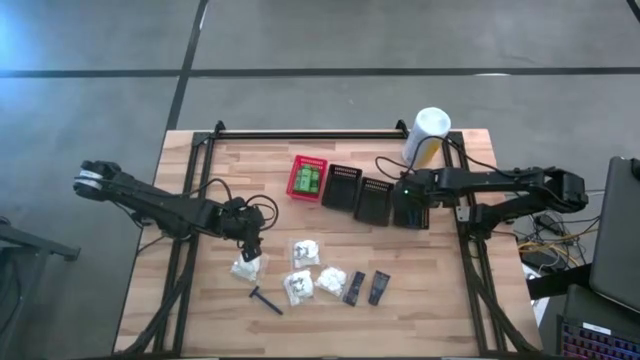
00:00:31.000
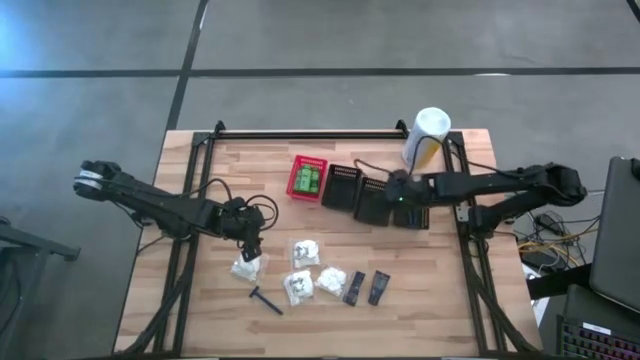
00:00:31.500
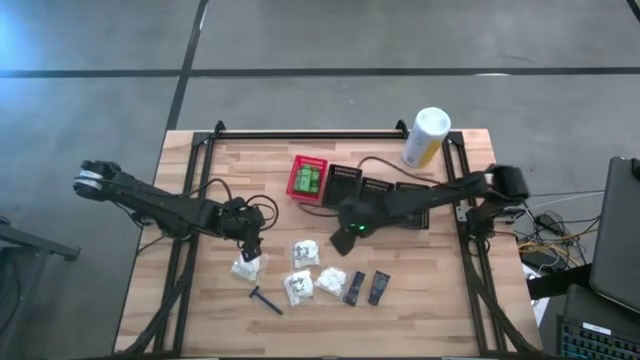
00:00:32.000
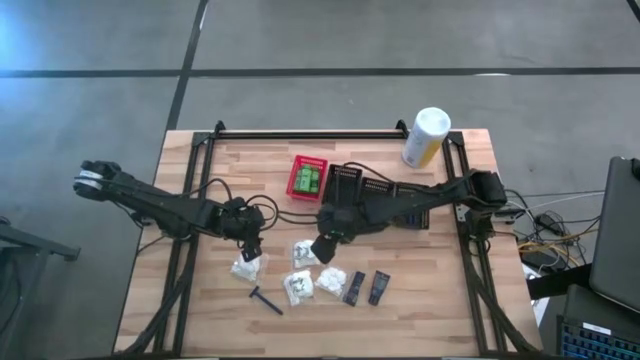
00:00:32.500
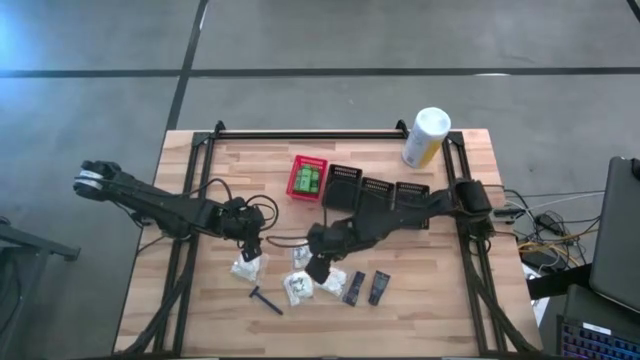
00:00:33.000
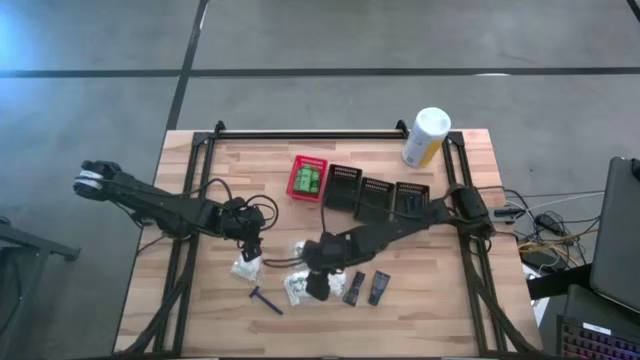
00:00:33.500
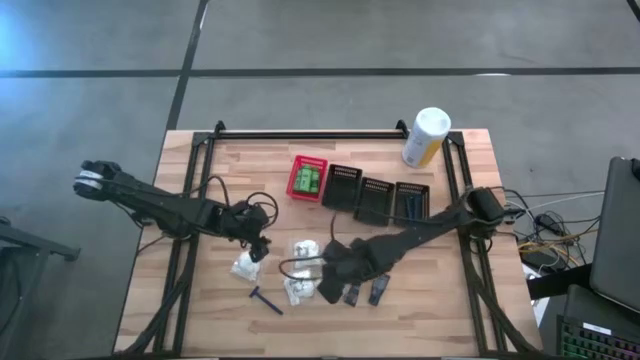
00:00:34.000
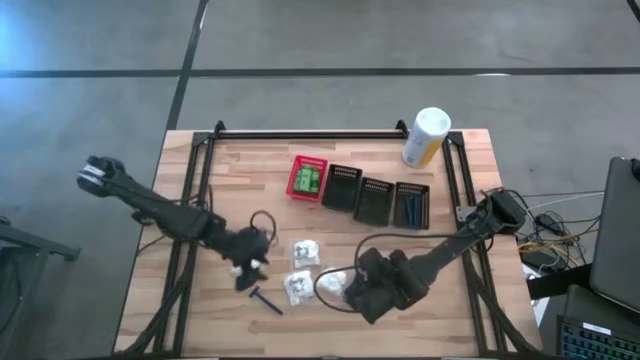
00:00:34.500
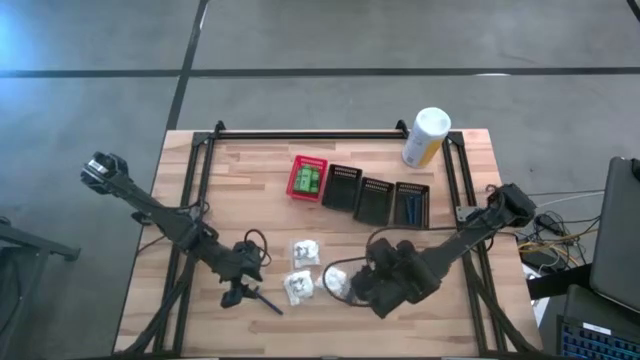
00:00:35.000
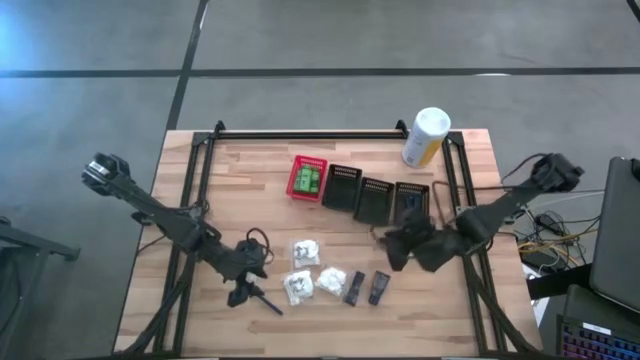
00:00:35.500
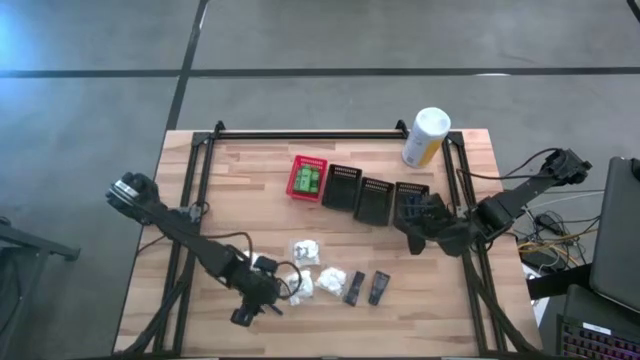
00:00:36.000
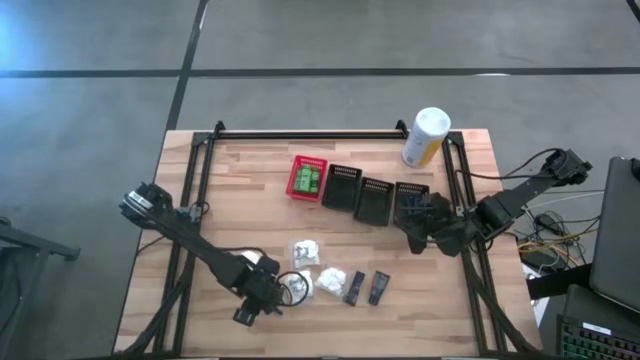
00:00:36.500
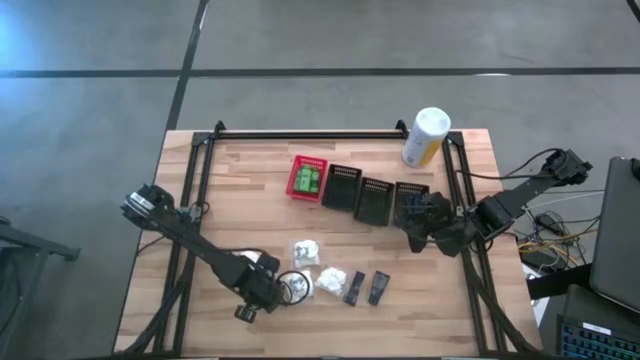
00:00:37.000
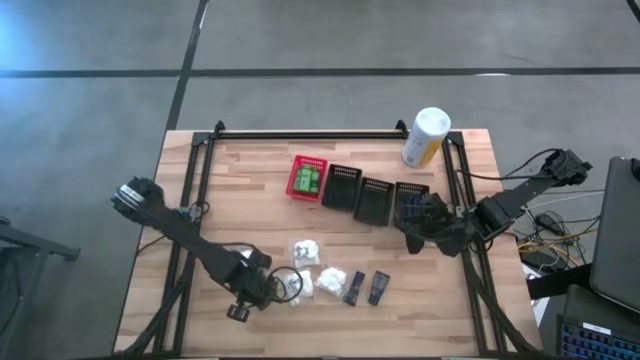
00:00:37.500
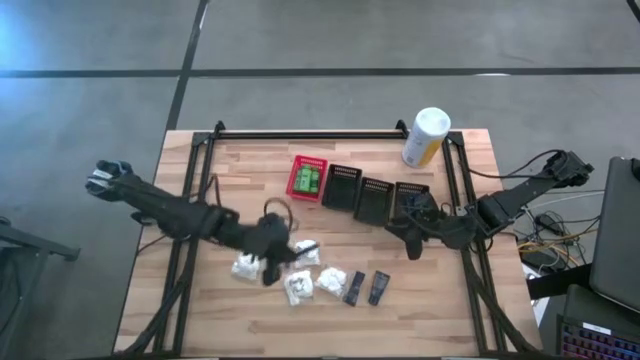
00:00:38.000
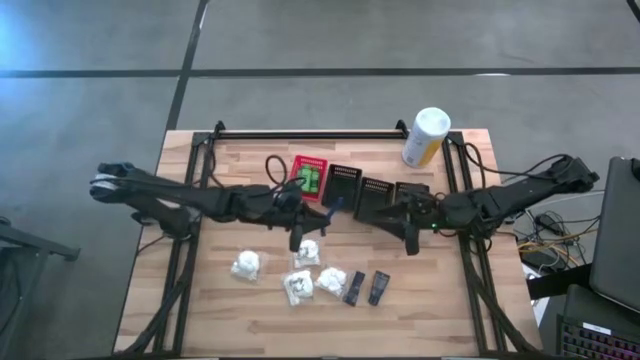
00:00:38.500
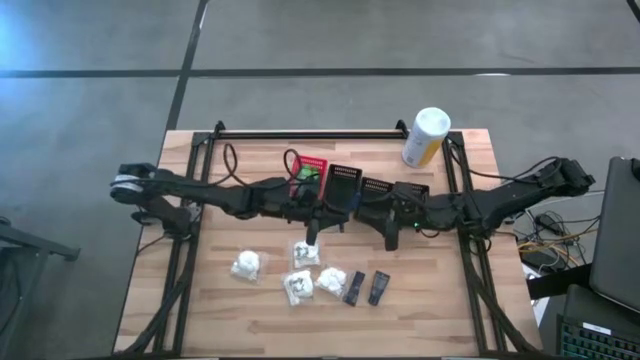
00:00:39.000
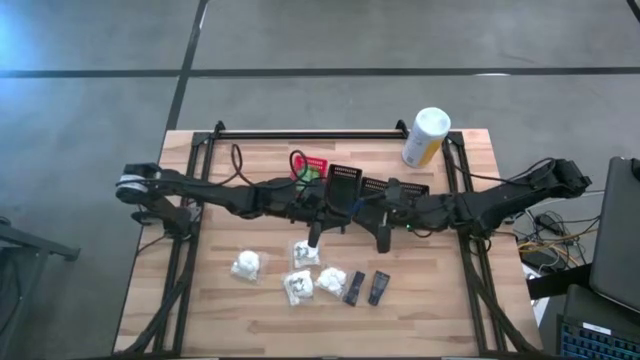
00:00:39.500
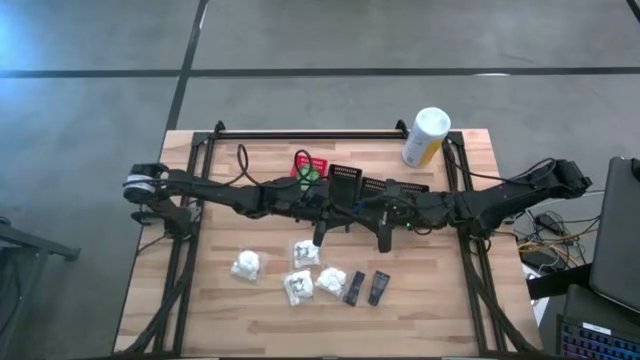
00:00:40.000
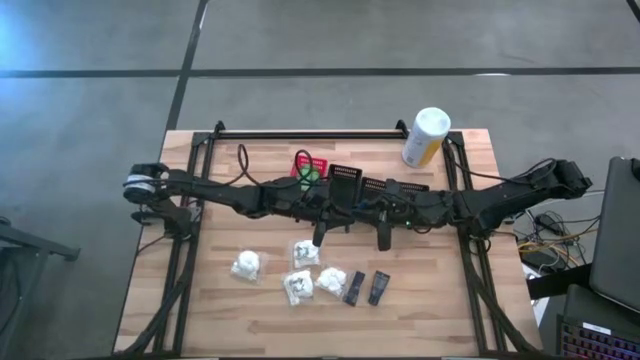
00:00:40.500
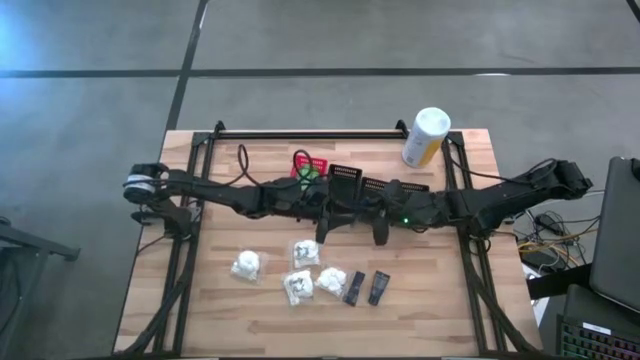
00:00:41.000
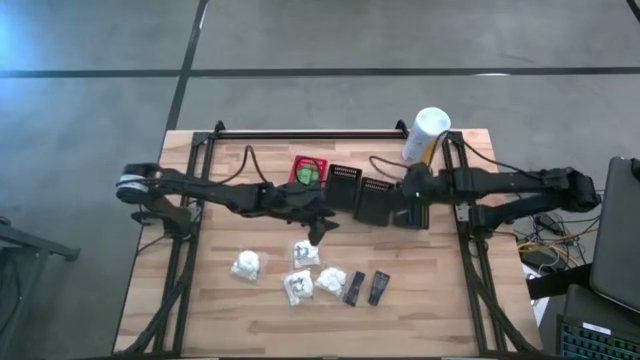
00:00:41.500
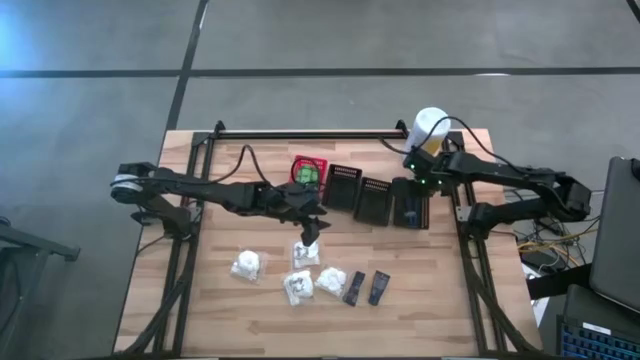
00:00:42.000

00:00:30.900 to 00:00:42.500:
Task: Pick & Place Travel size toiletries
Put the razor into the right black bin

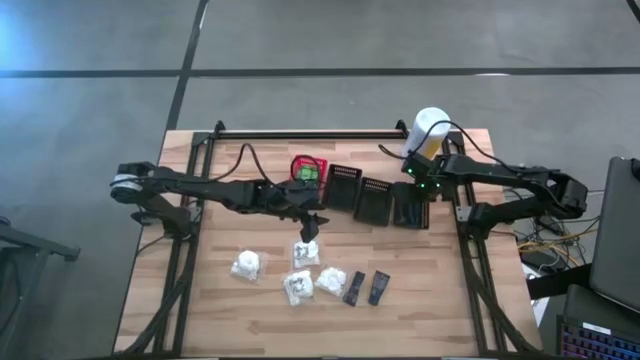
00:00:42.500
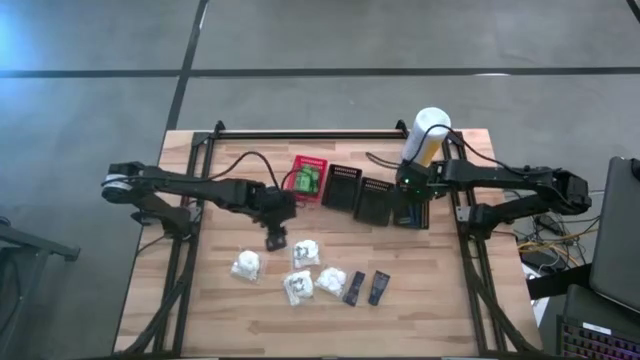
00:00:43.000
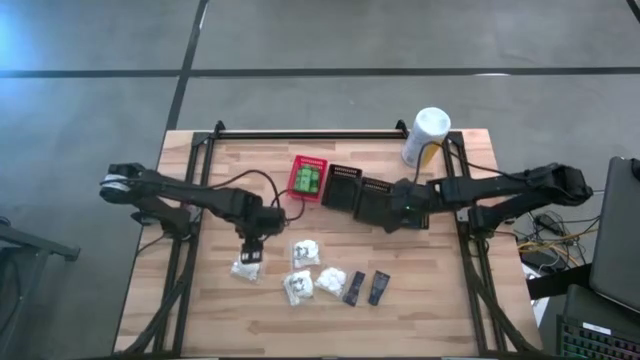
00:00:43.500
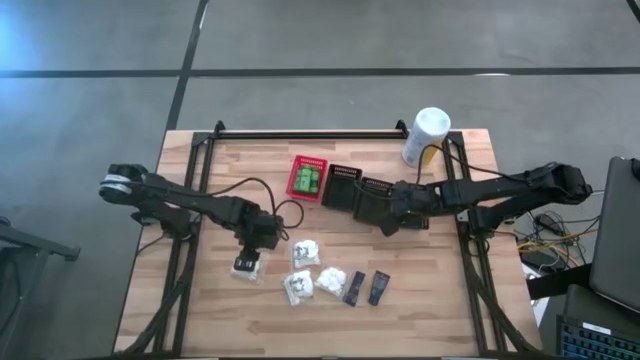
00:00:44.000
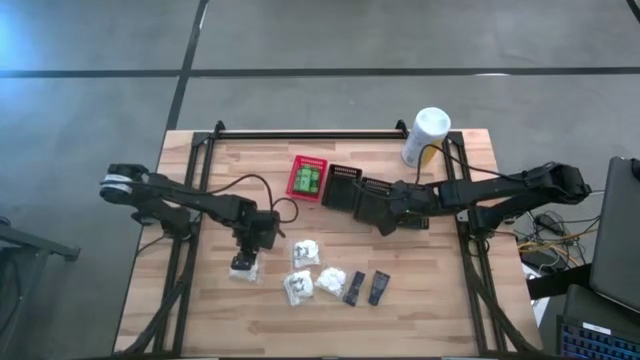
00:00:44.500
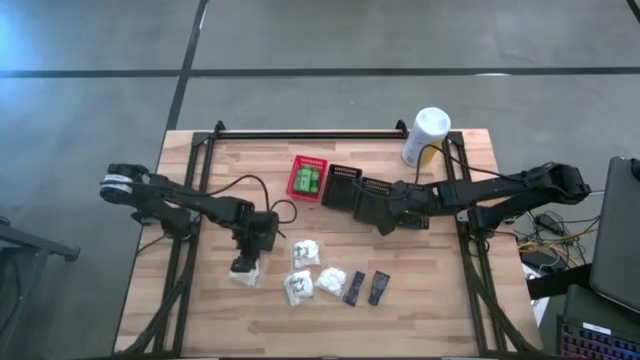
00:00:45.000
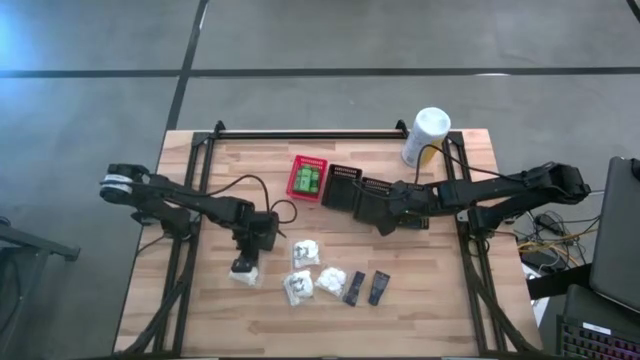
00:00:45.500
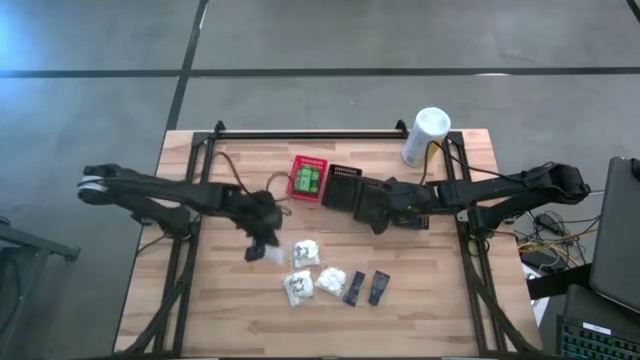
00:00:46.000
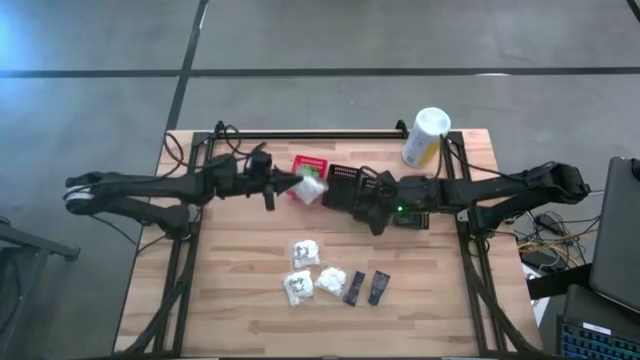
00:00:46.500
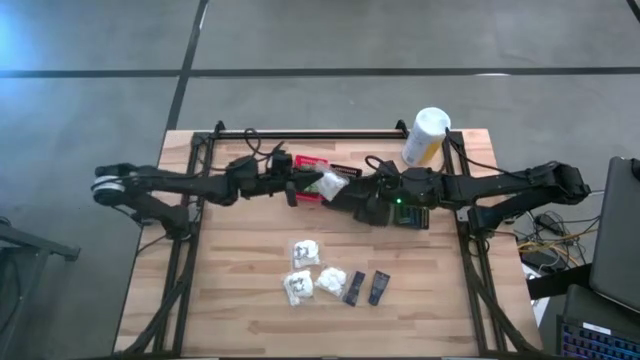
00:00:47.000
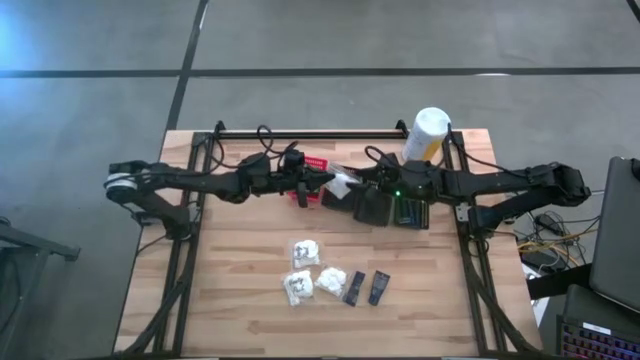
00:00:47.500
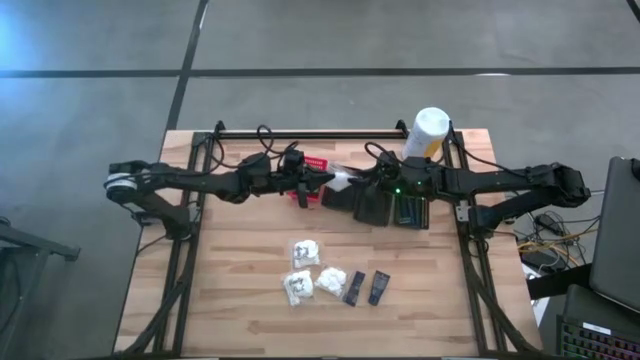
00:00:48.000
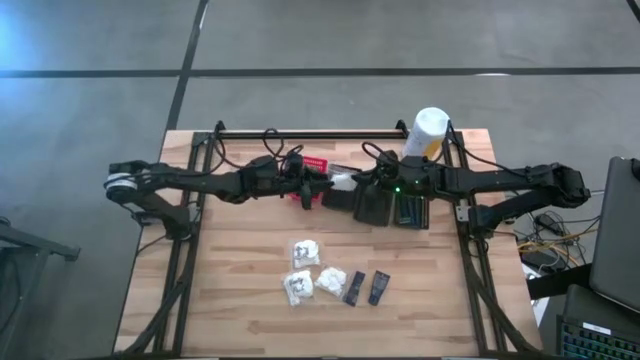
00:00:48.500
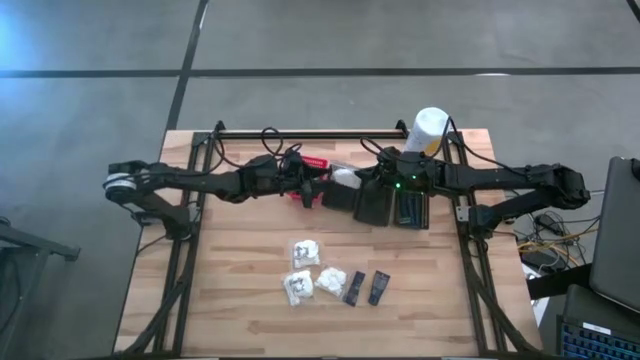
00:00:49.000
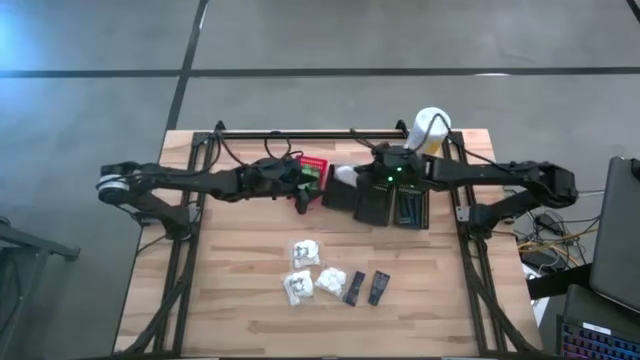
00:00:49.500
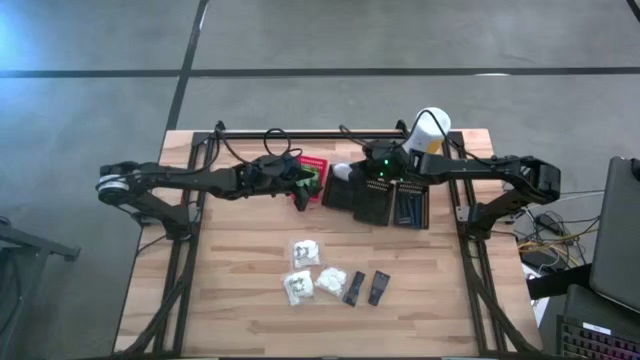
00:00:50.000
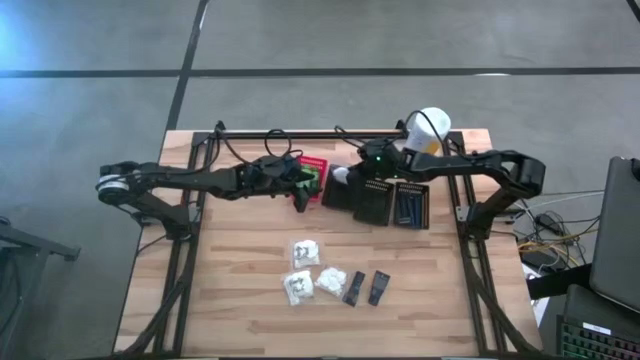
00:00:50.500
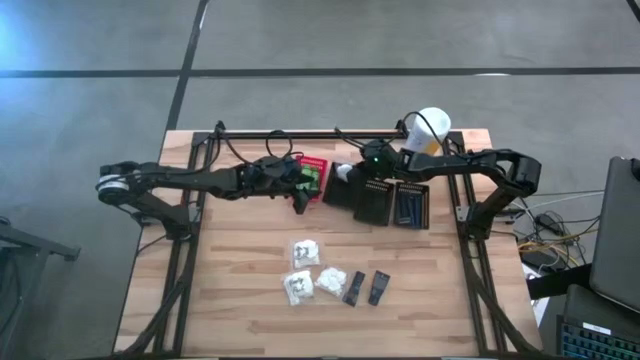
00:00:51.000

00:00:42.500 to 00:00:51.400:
Put the cotton pack into the left black bin
